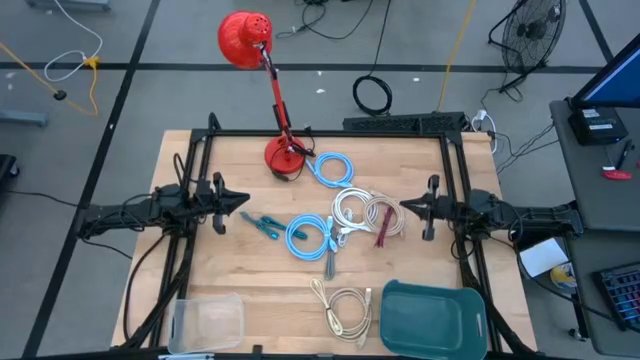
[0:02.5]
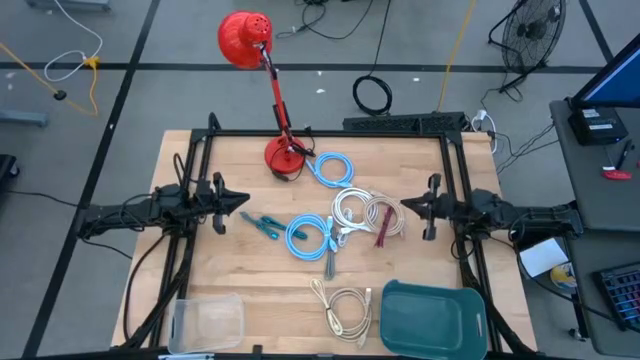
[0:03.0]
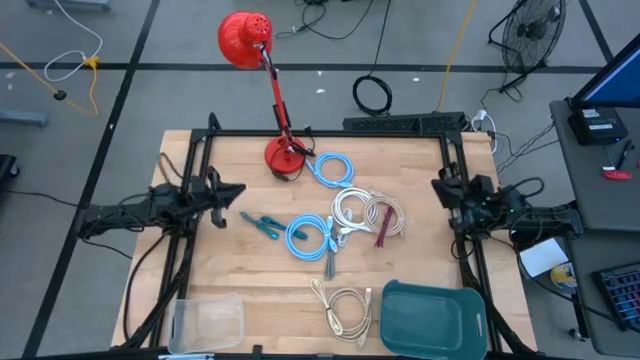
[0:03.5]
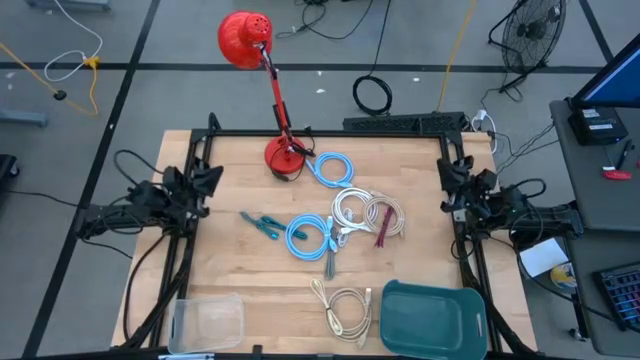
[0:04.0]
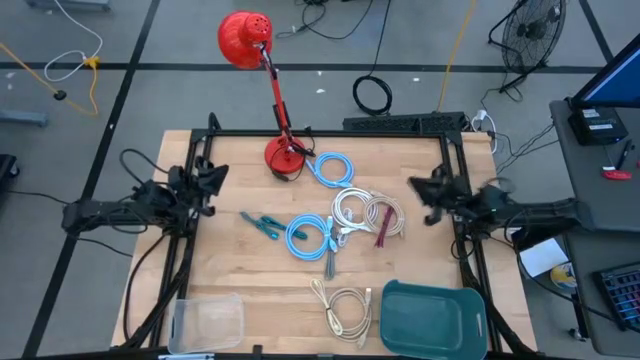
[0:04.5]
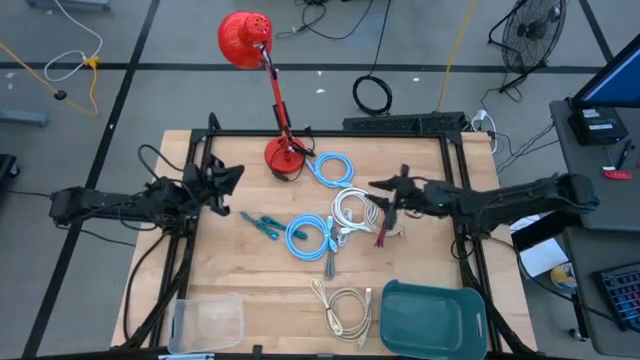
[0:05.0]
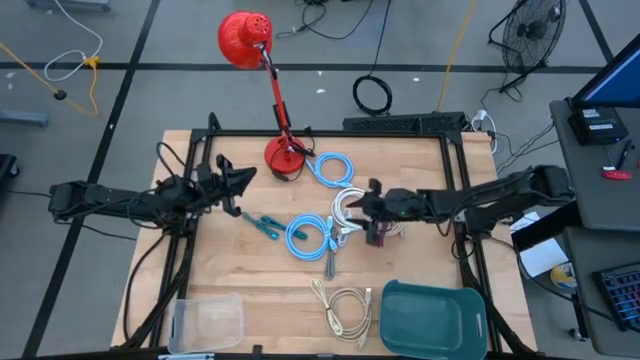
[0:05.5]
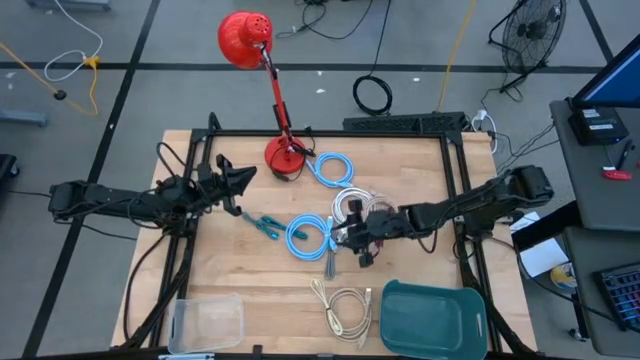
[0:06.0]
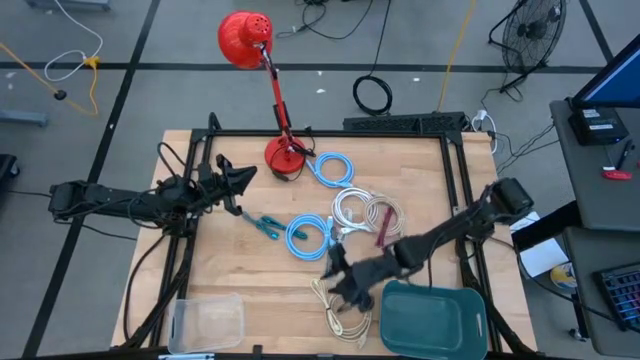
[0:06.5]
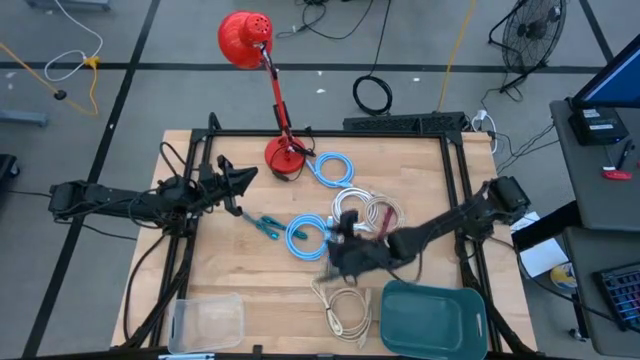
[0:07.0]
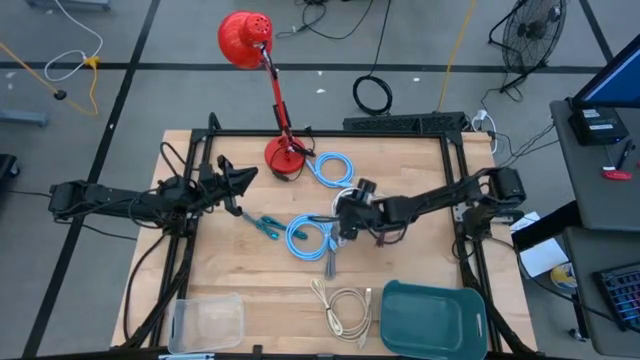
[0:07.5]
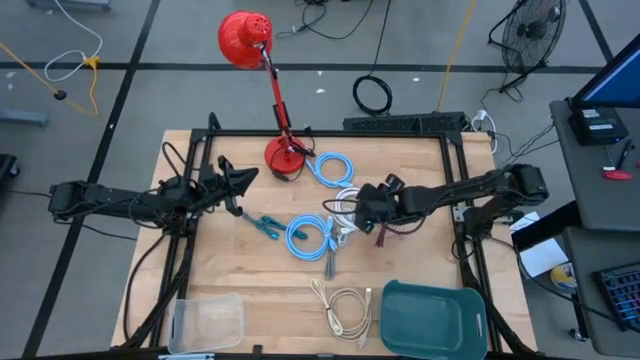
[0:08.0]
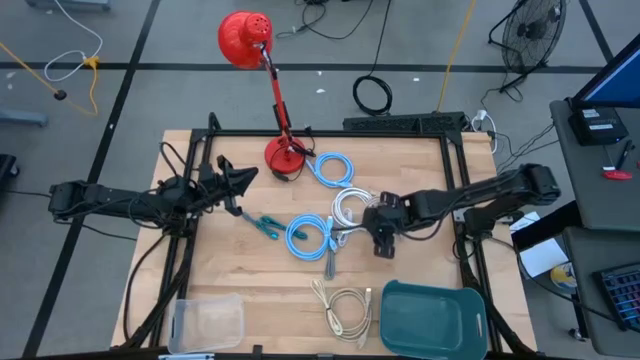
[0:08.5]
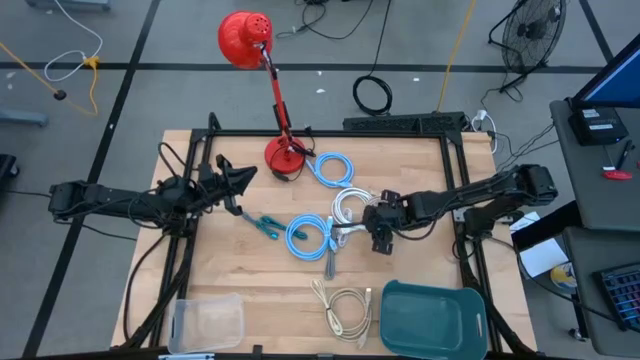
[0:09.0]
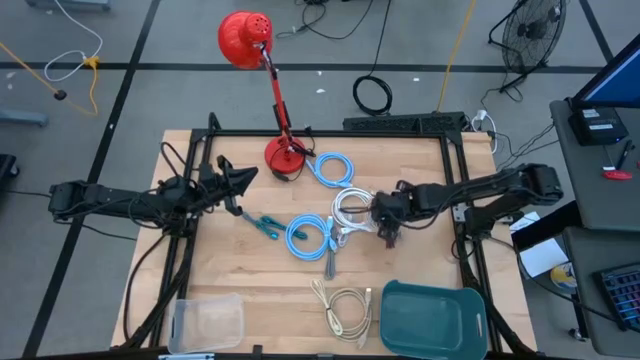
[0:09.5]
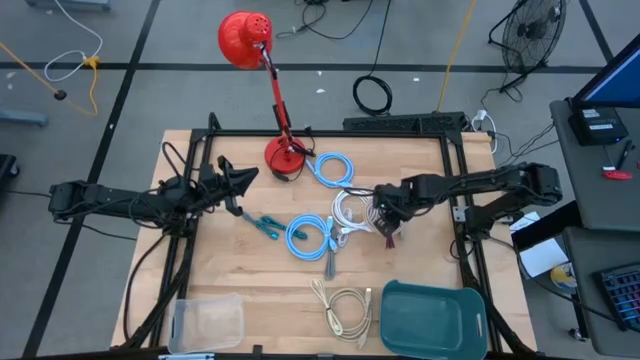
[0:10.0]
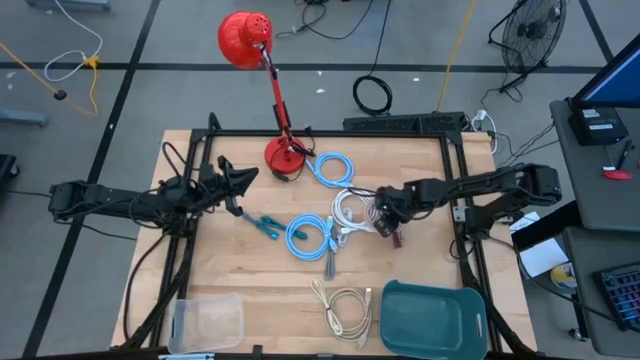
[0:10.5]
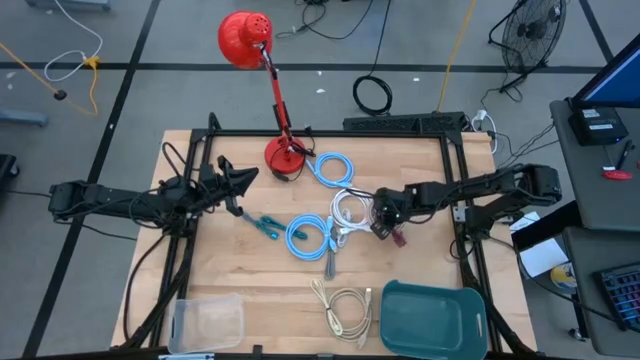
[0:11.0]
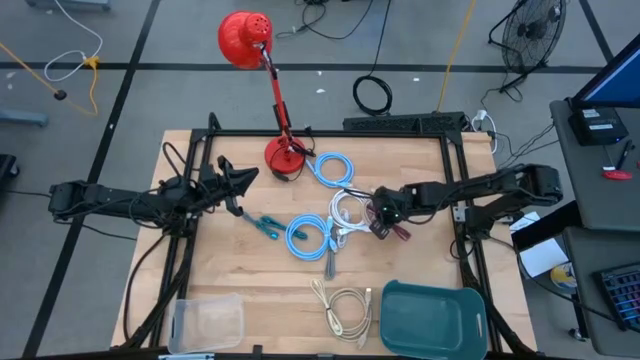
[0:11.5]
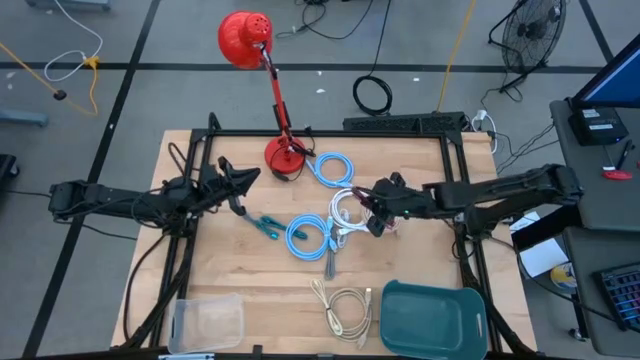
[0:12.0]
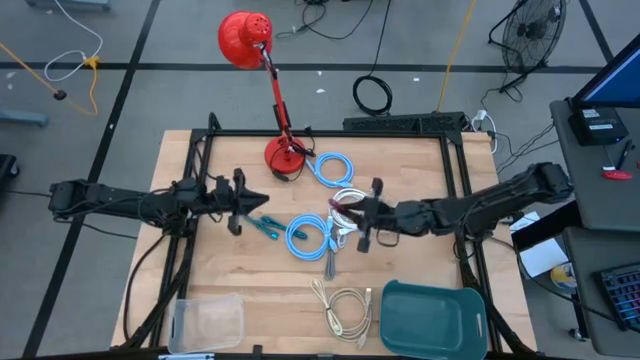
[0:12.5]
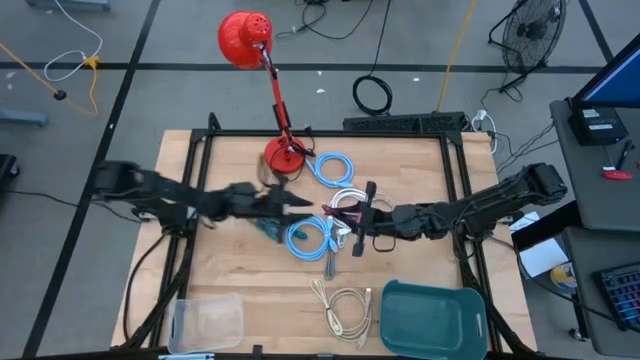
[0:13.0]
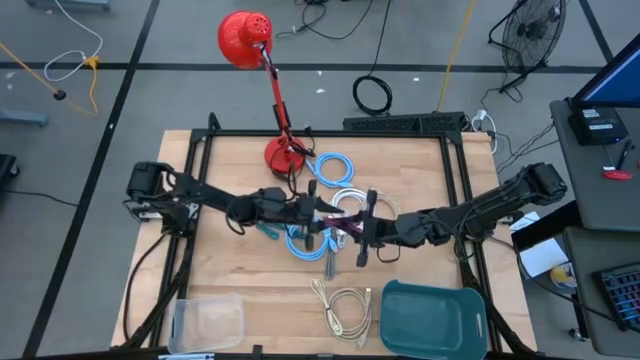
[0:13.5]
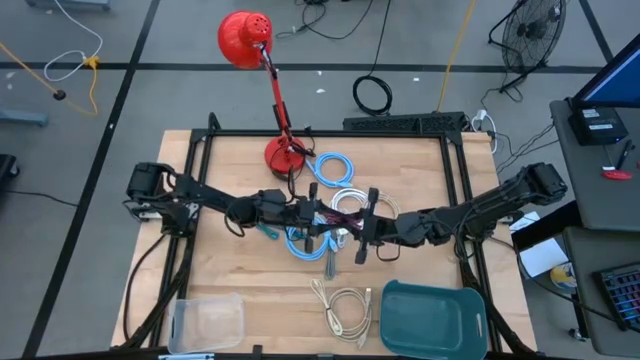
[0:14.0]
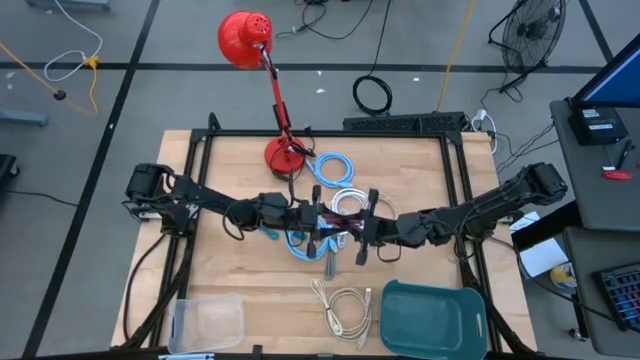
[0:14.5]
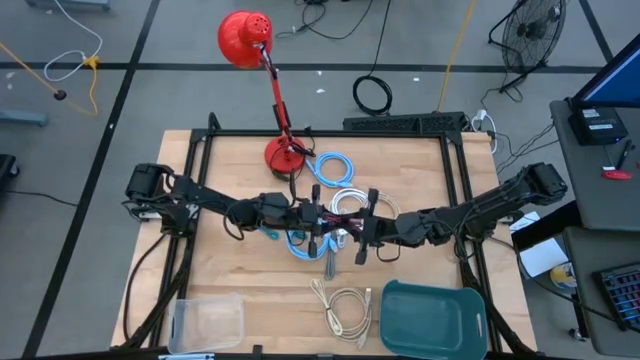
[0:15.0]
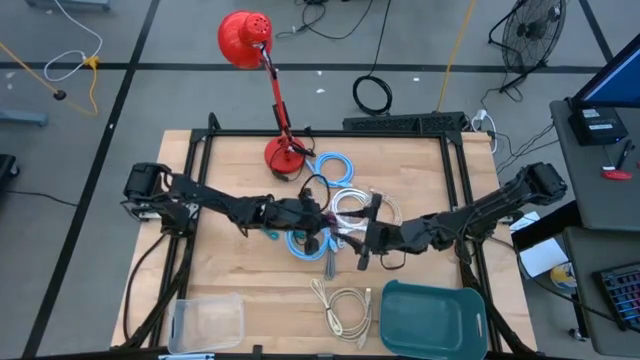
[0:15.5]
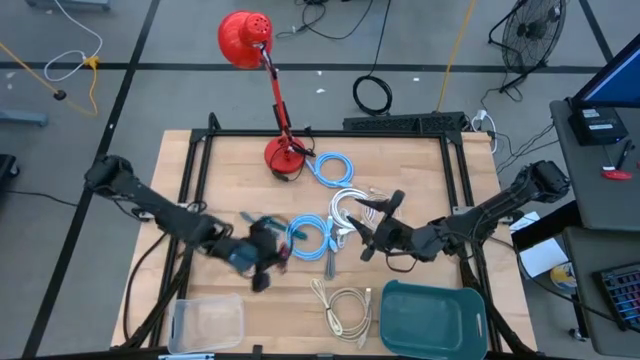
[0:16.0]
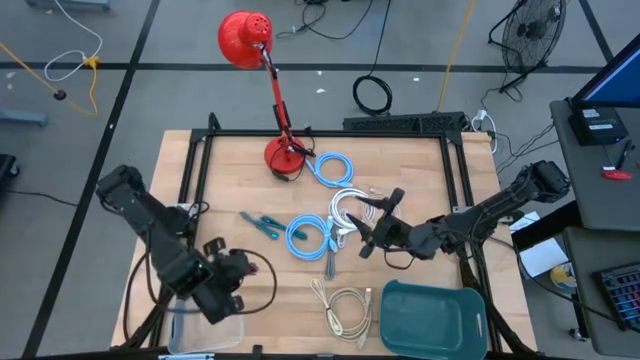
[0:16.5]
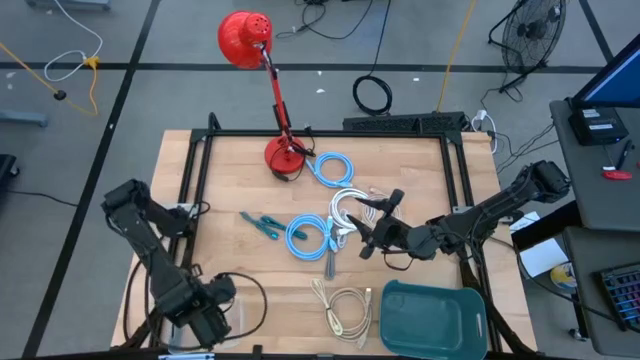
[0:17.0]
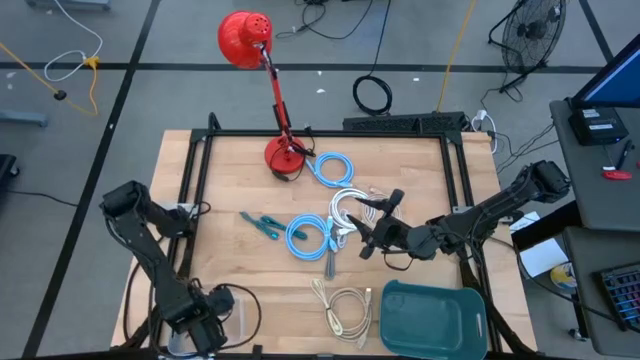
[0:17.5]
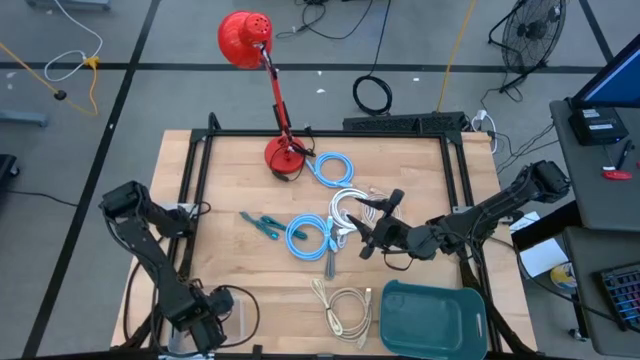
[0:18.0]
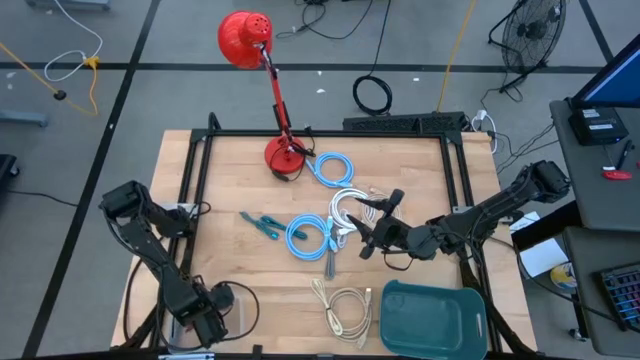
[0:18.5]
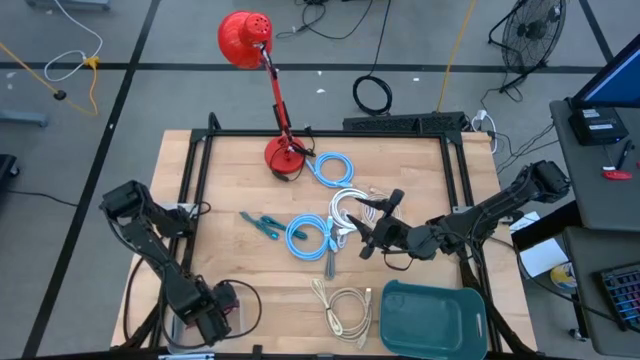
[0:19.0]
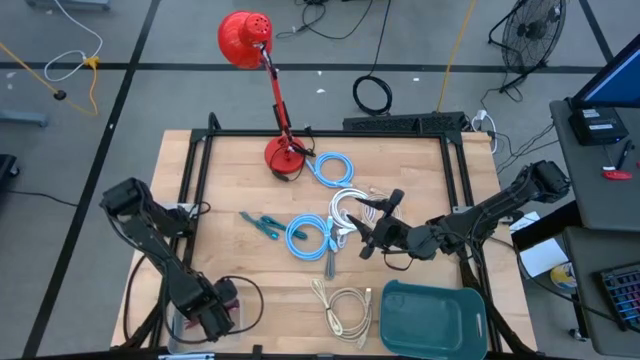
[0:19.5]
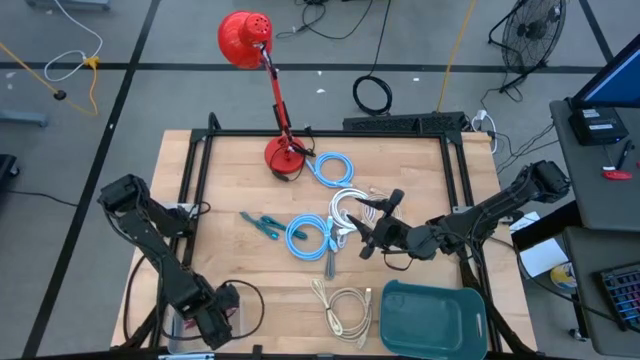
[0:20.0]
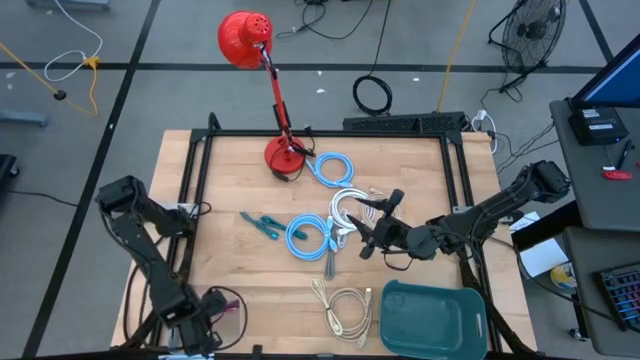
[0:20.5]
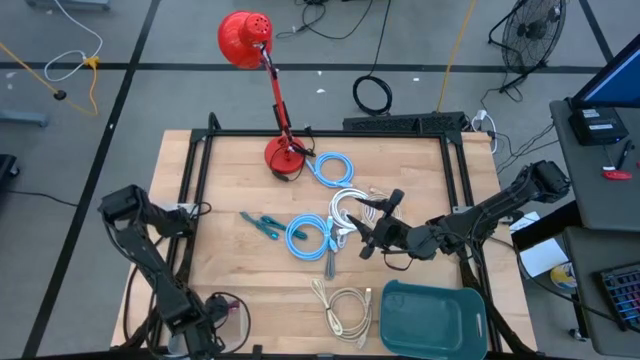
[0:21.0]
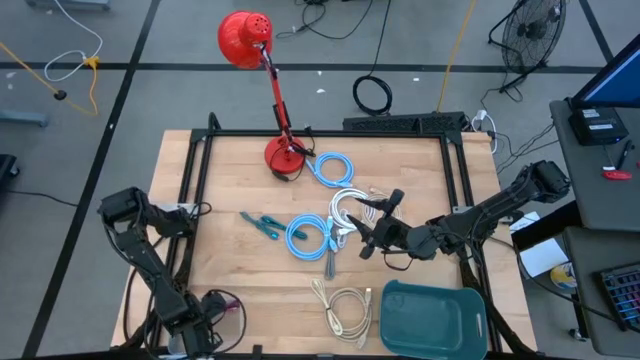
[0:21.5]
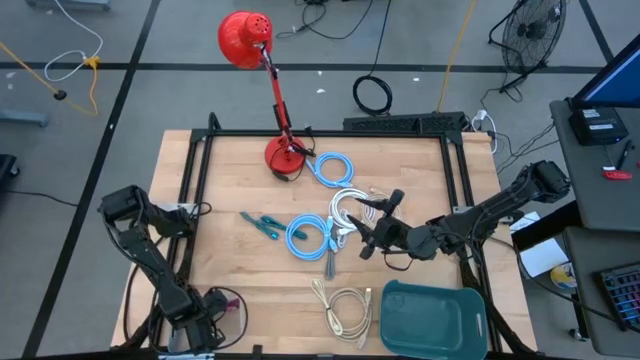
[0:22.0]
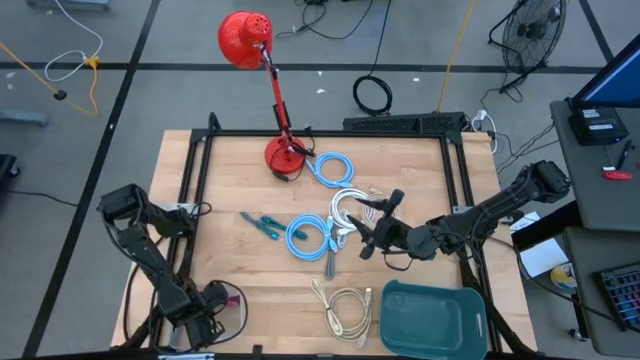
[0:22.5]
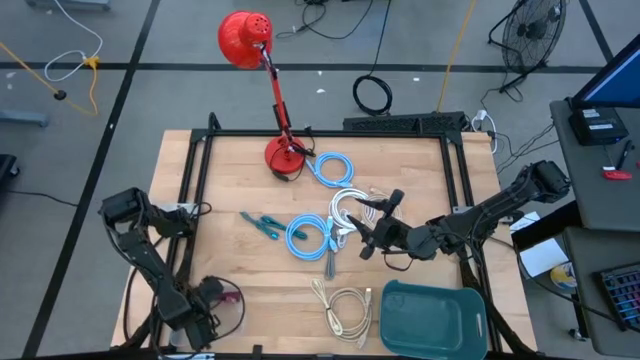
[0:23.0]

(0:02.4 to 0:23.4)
Task: Pick & Place USB Port
Put the pink charger cable into the transparent bin
